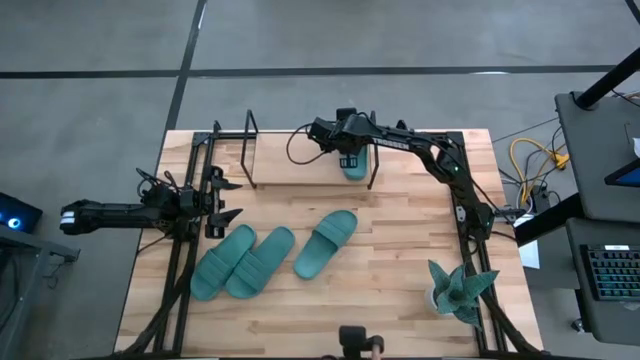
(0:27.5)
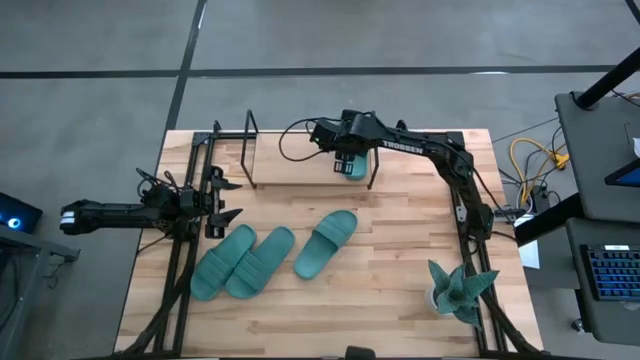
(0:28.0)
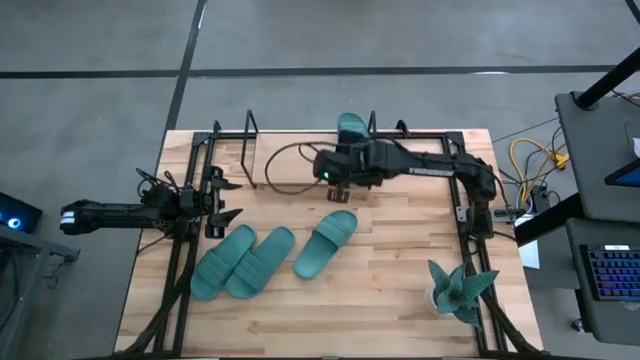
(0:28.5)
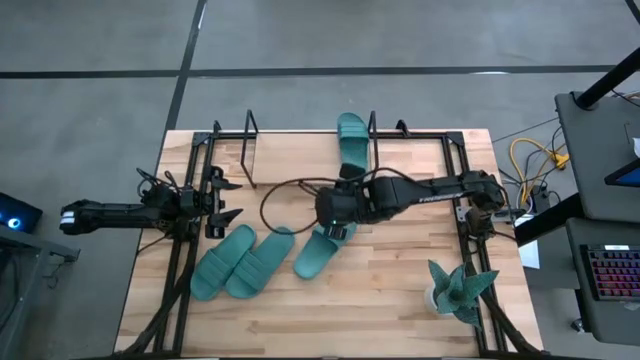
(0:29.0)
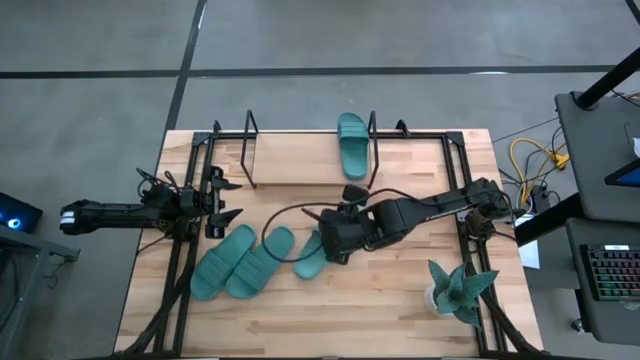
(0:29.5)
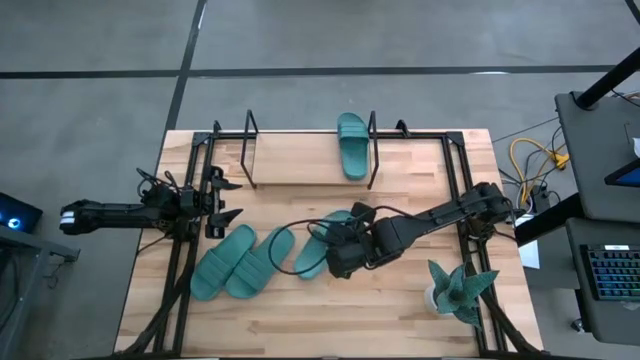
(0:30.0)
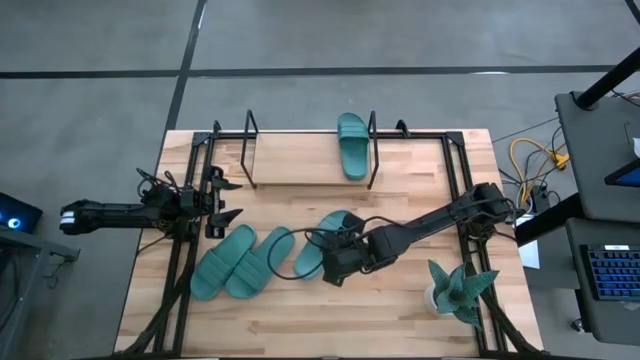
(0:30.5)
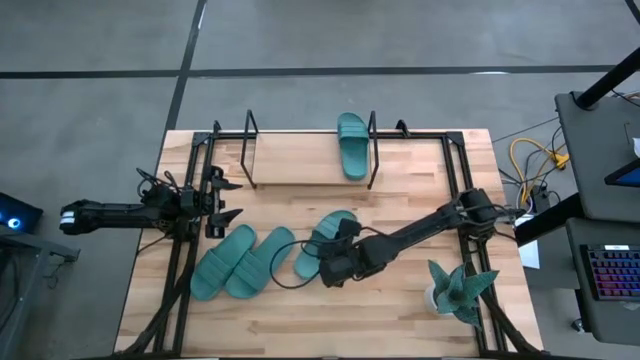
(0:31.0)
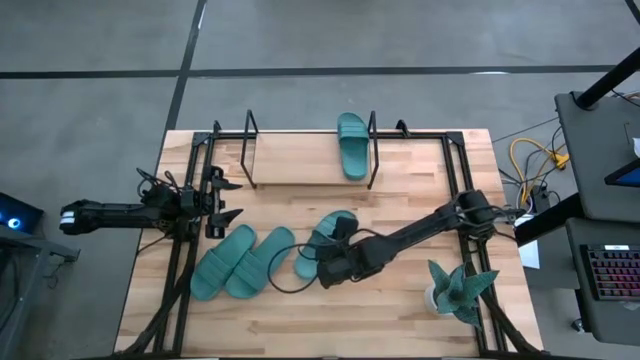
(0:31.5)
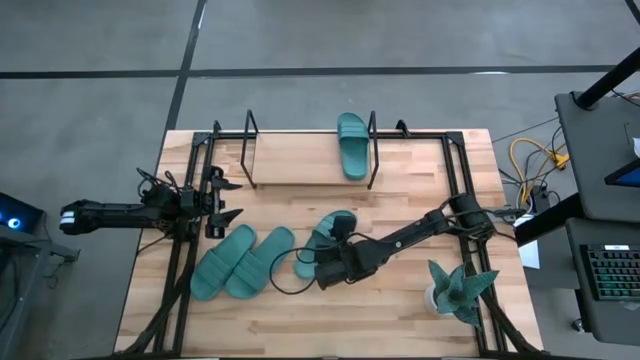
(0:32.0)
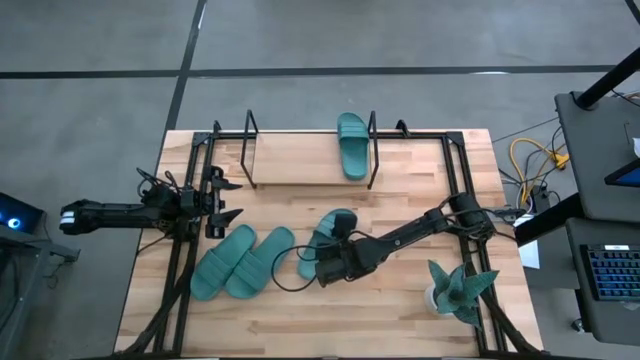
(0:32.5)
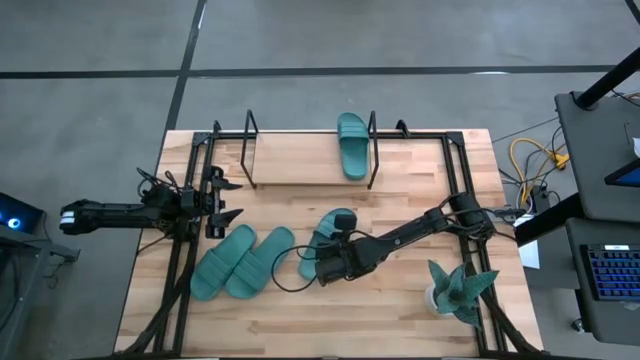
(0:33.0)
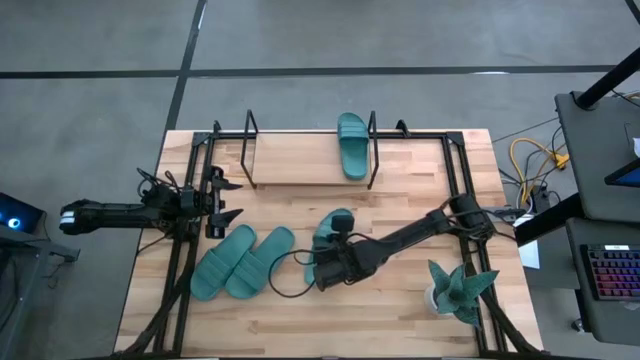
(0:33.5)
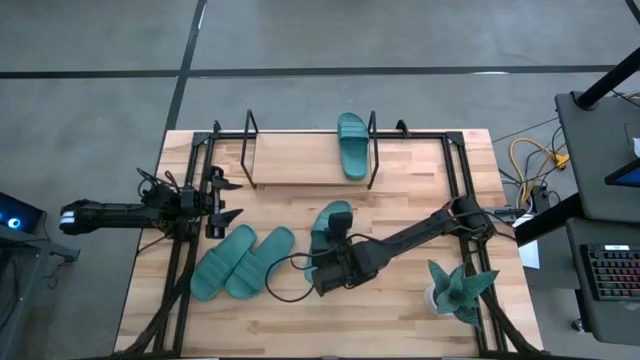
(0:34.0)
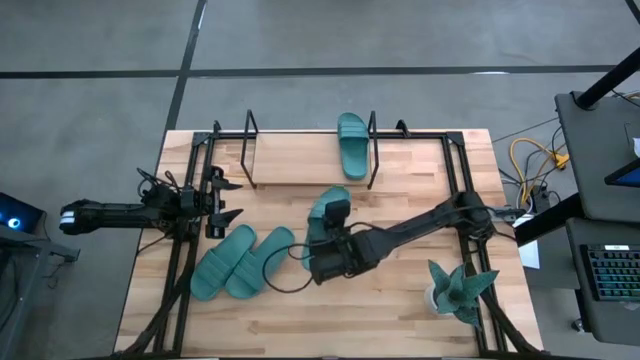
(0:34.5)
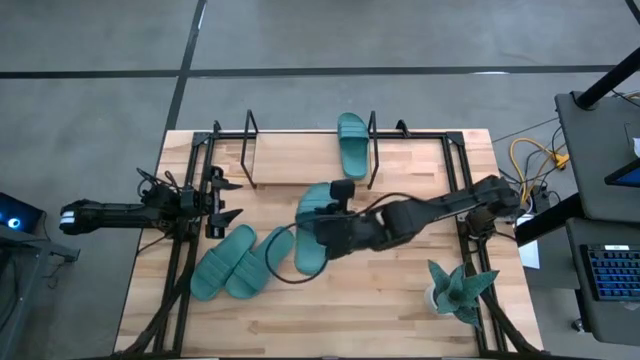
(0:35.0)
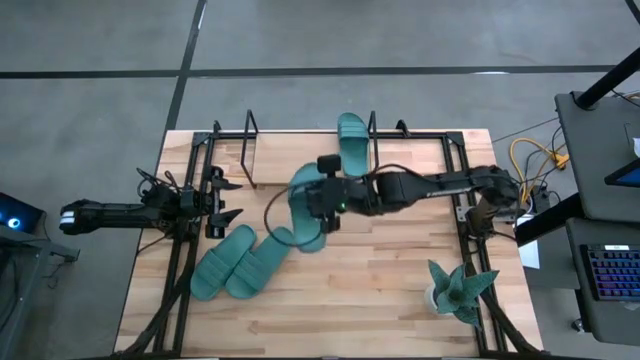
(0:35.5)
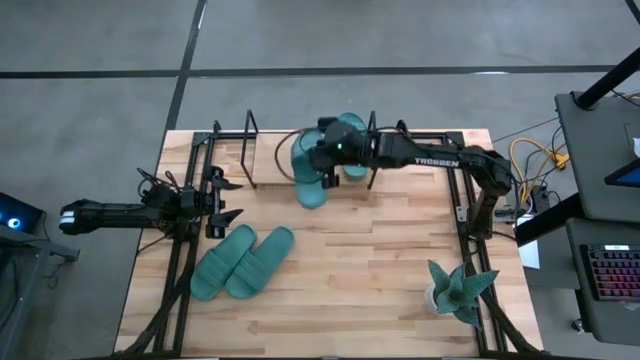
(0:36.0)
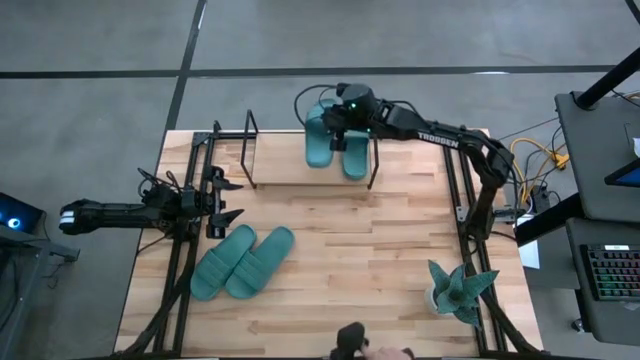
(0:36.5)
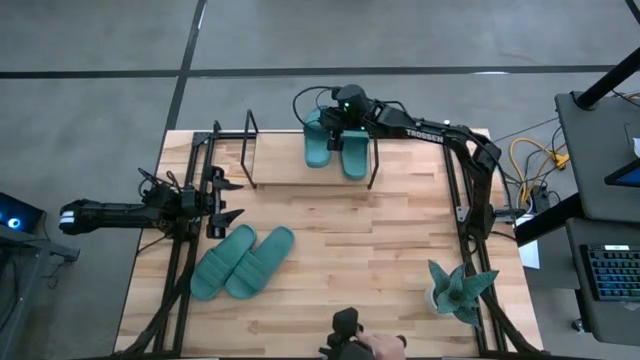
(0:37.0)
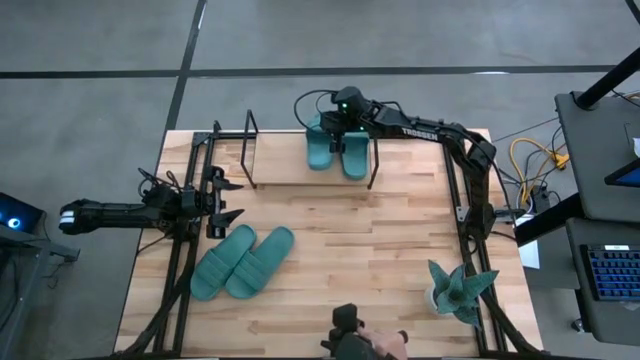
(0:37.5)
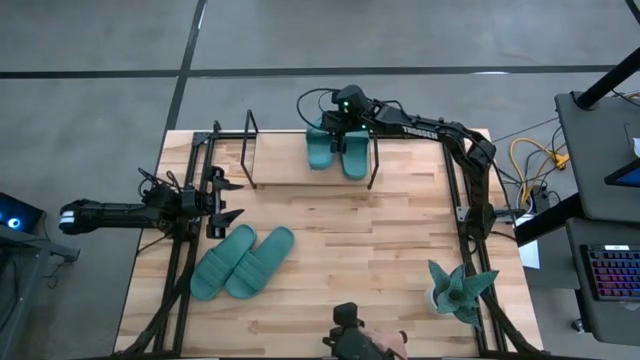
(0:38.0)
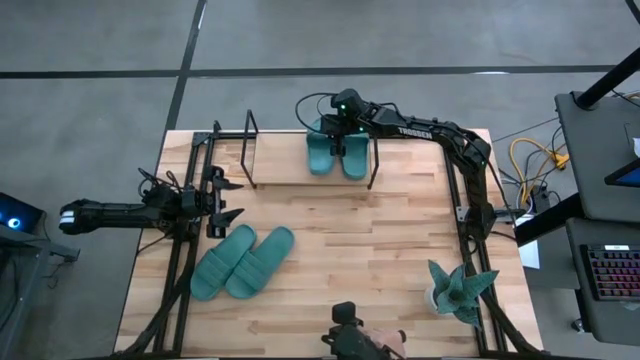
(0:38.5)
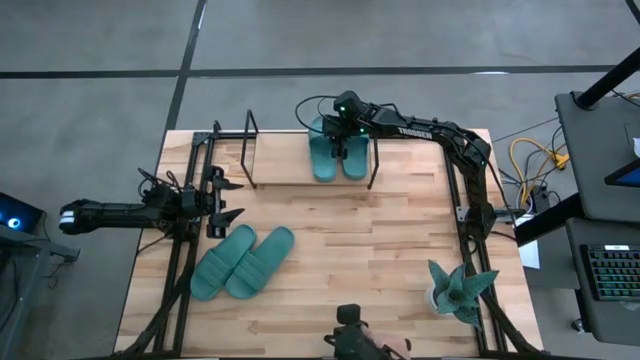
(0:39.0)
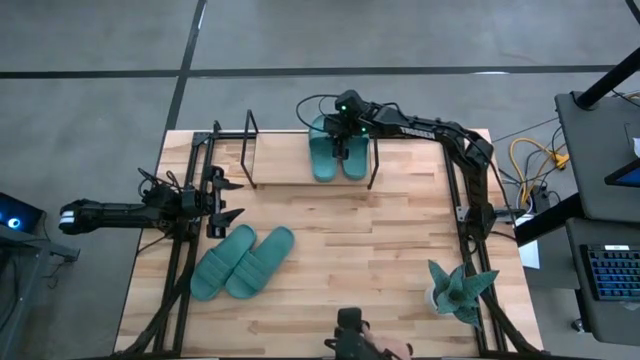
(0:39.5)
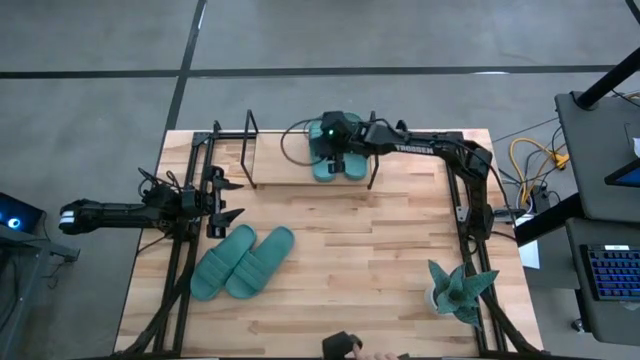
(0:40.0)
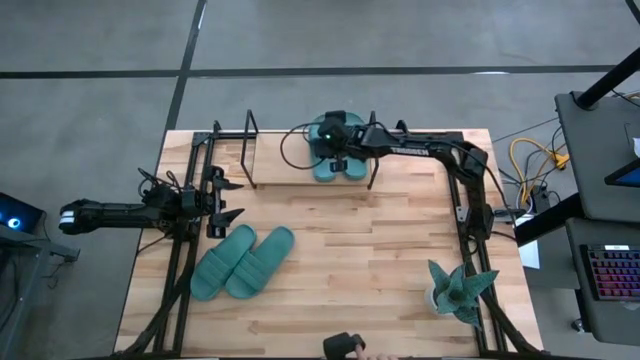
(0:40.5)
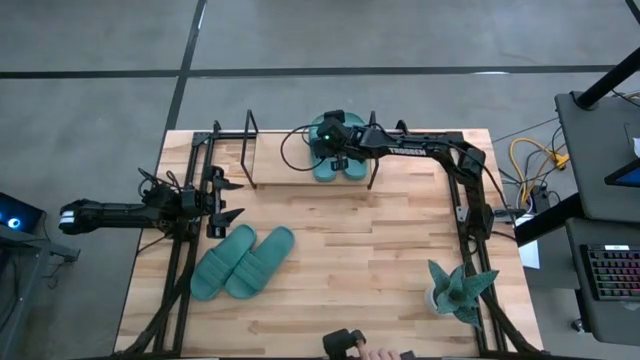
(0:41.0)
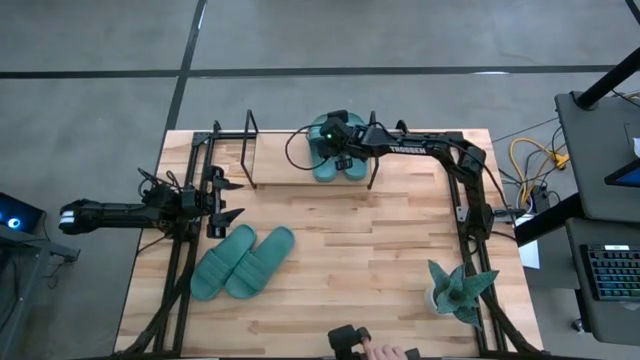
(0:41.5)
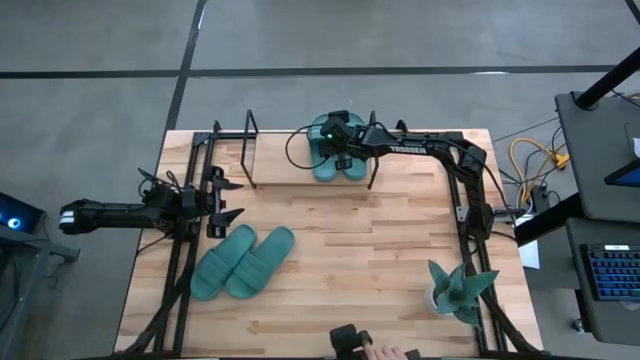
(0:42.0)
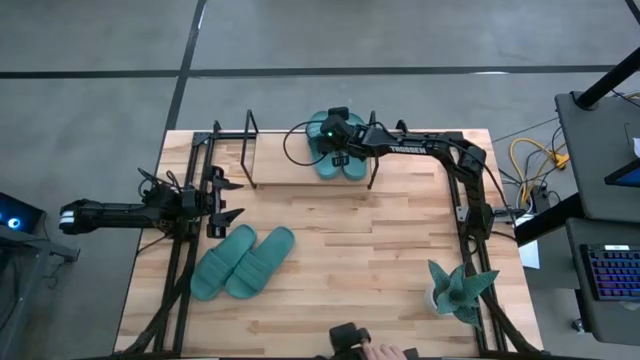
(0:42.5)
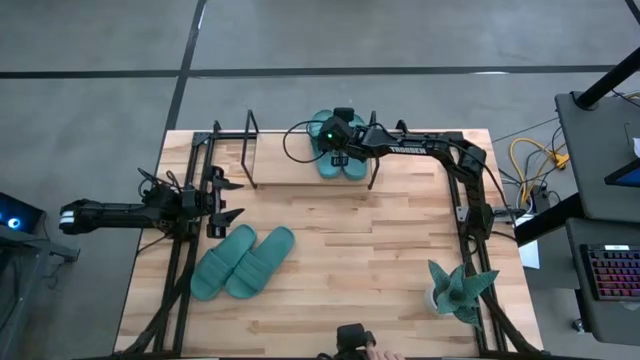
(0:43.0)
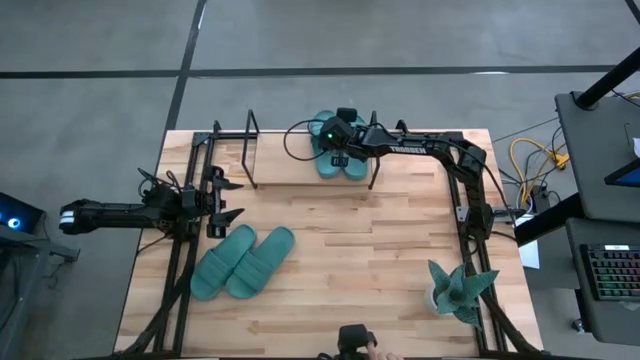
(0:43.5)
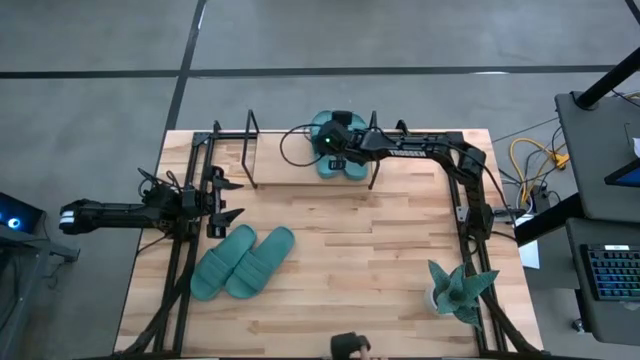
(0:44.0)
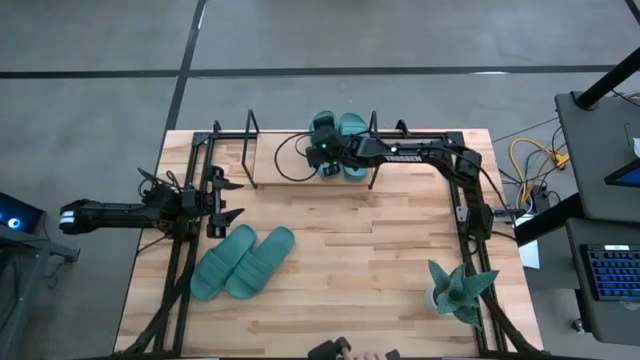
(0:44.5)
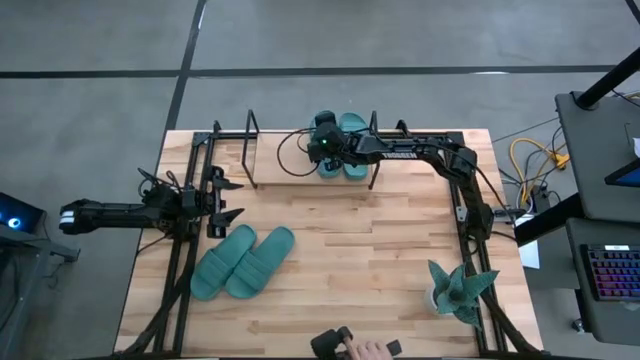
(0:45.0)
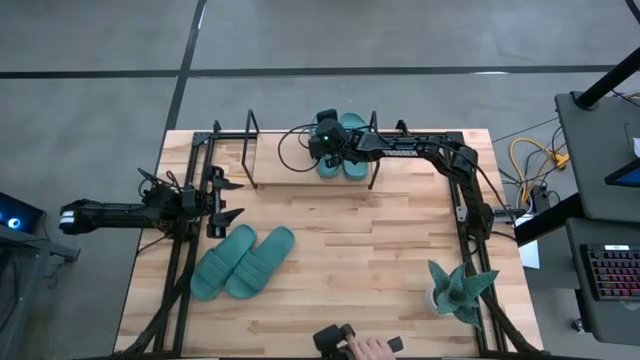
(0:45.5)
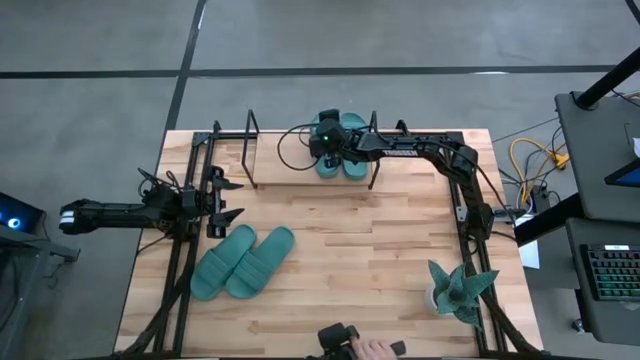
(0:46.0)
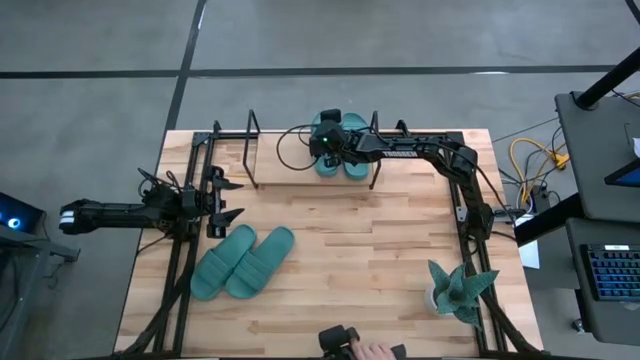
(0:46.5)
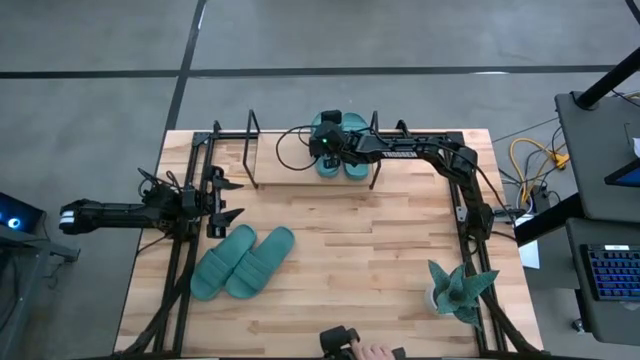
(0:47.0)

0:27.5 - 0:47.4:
Task: Pick and place slides into the shelf
Put the blue slide on the shelf

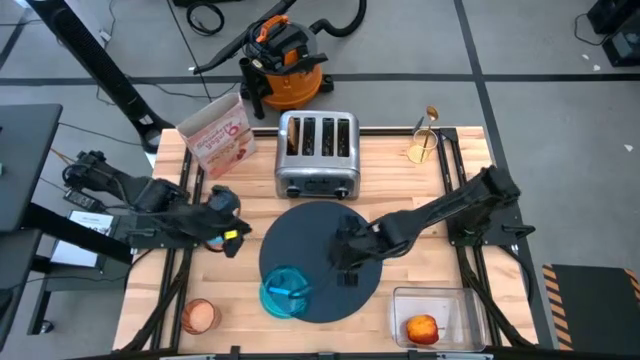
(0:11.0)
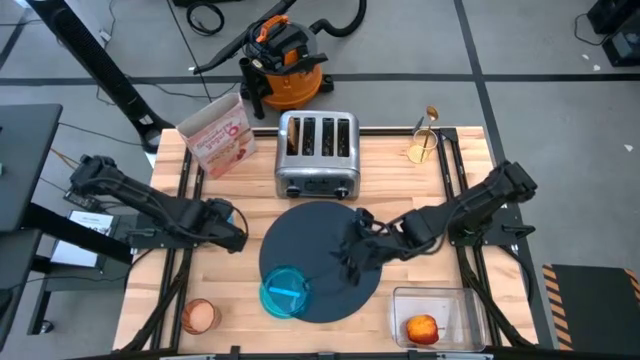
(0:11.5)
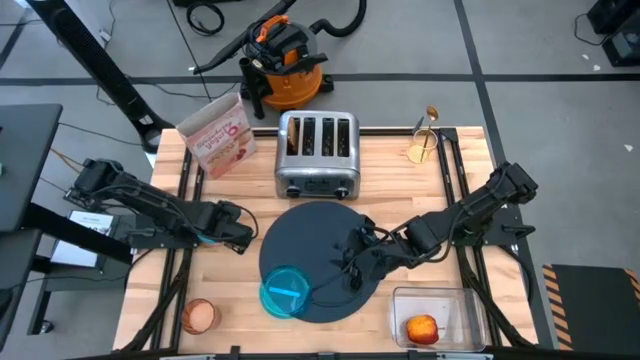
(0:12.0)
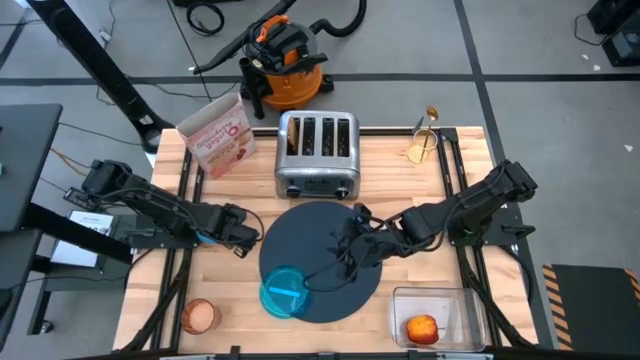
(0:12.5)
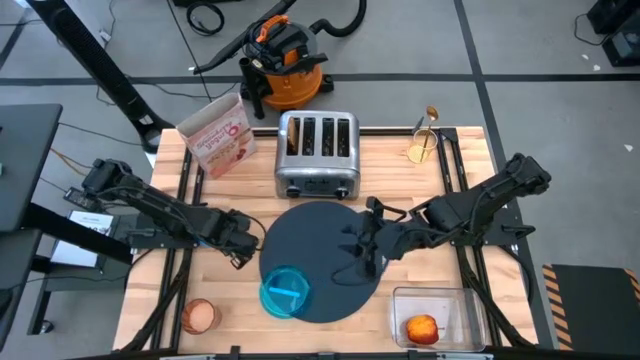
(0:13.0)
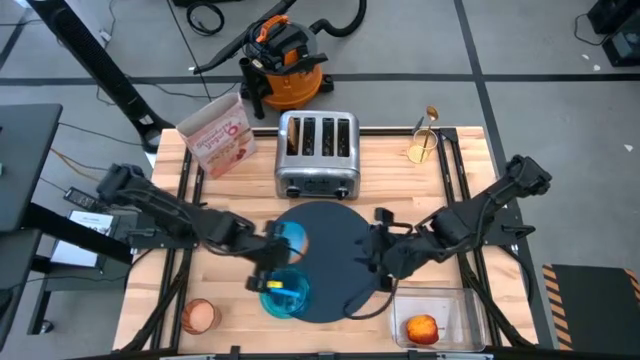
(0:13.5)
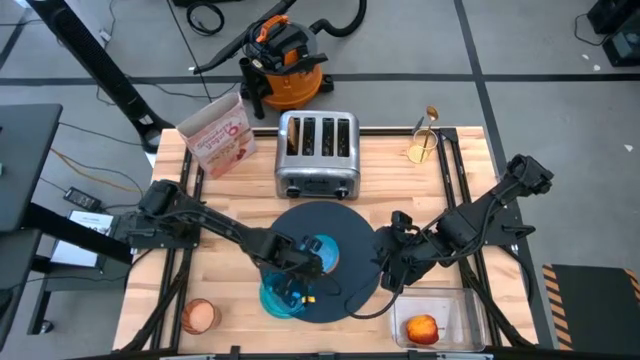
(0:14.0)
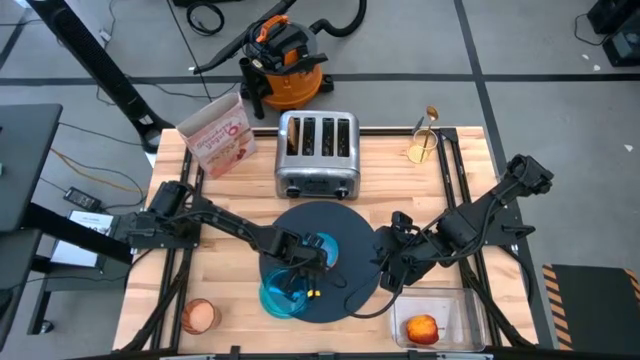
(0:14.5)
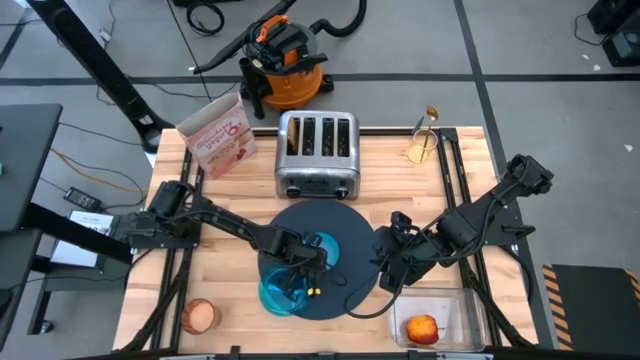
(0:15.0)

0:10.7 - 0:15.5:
Task: Arrange a breakfast setting
Put the blue bowl on the top right side of the blue plate
